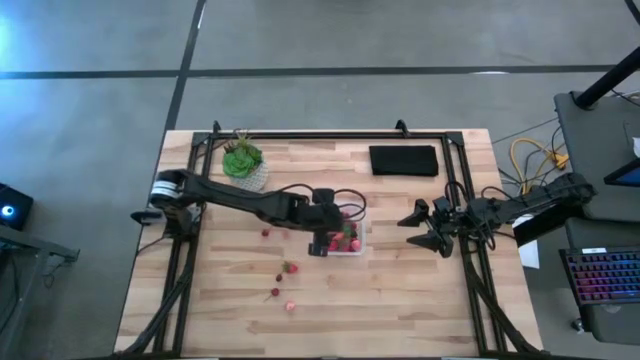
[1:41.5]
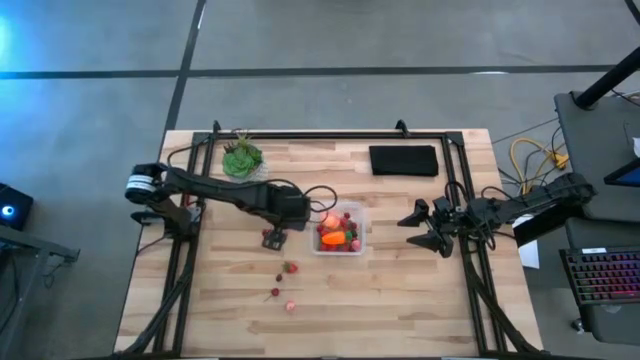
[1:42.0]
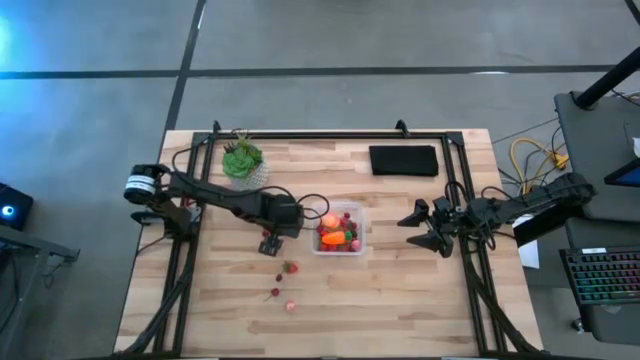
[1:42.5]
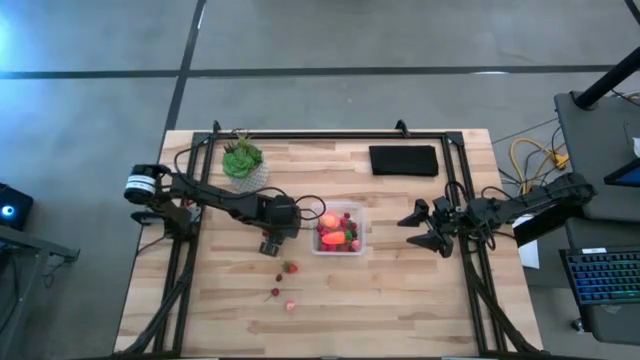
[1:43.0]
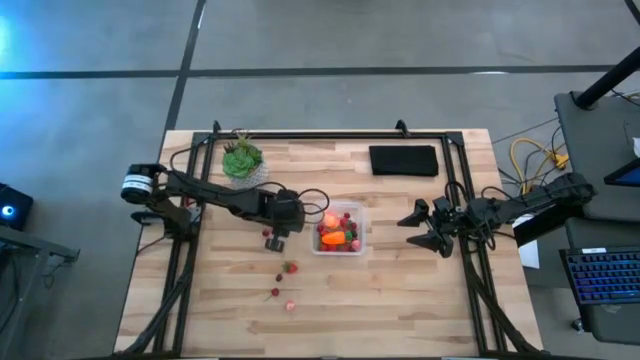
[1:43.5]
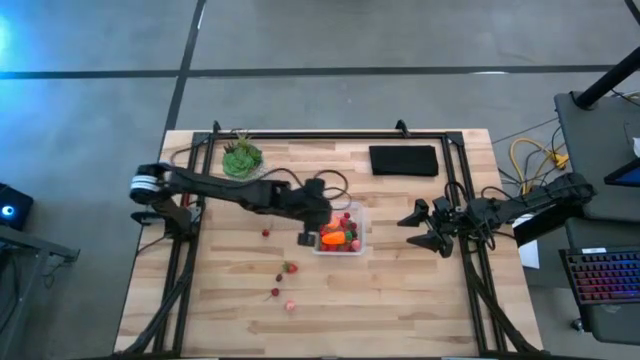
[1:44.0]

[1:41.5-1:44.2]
Task: Pick and placing Produce into tupperware
Put the top small peach into the transparent container

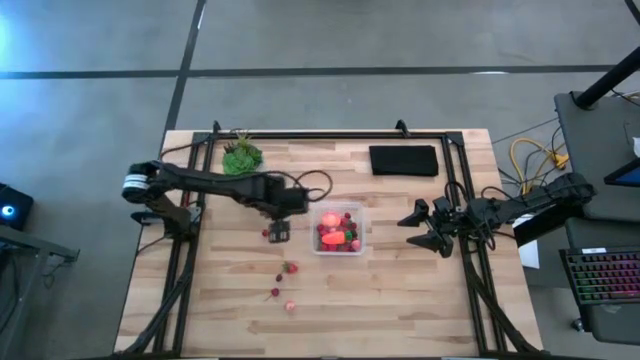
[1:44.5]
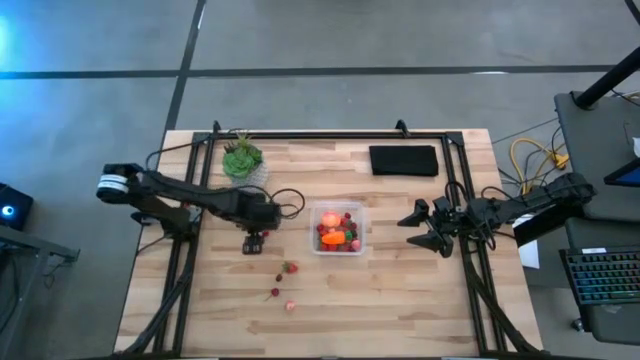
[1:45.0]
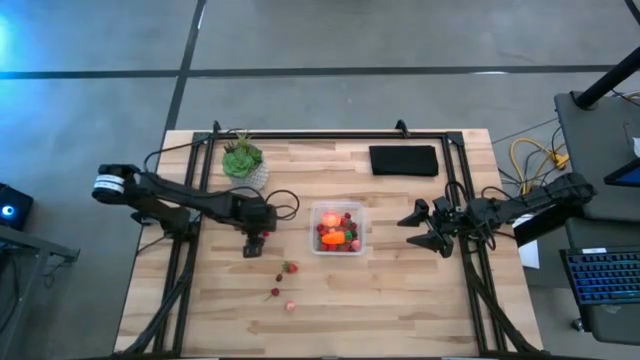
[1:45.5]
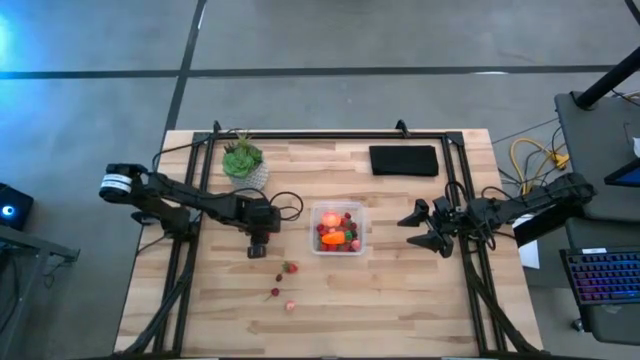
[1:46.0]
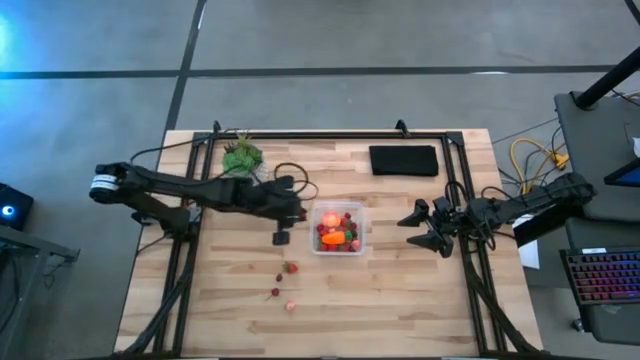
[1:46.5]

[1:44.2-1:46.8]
Put the red cherry into the transparent container

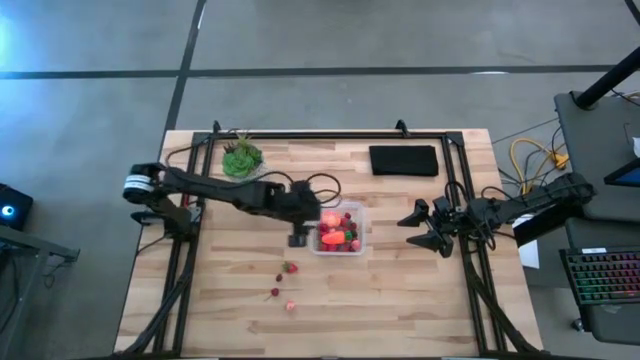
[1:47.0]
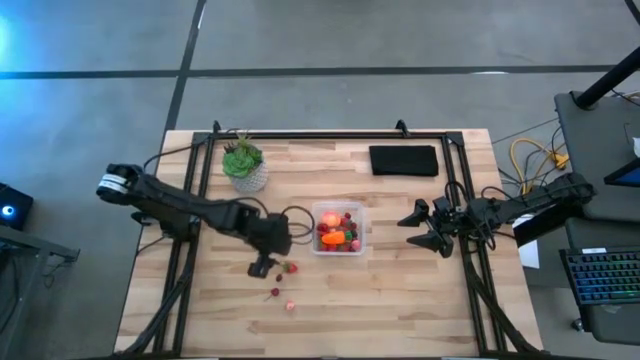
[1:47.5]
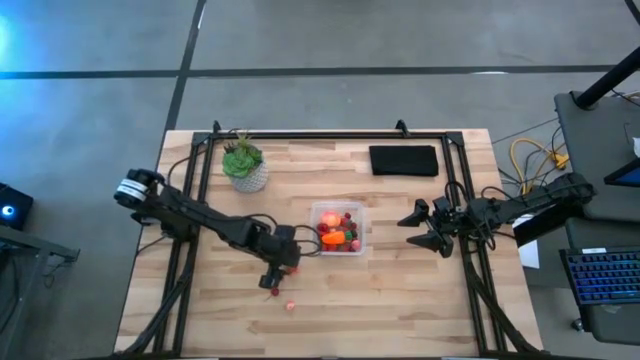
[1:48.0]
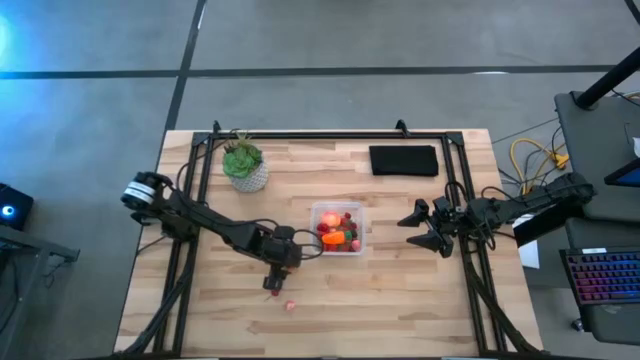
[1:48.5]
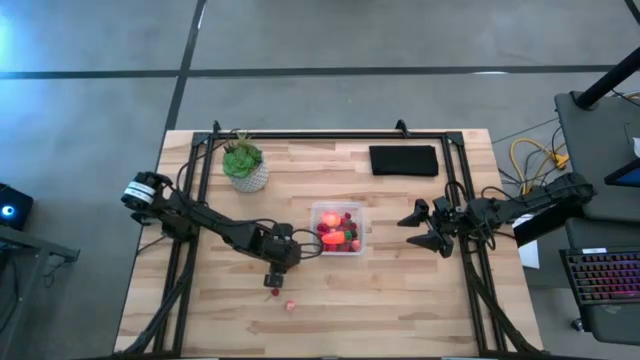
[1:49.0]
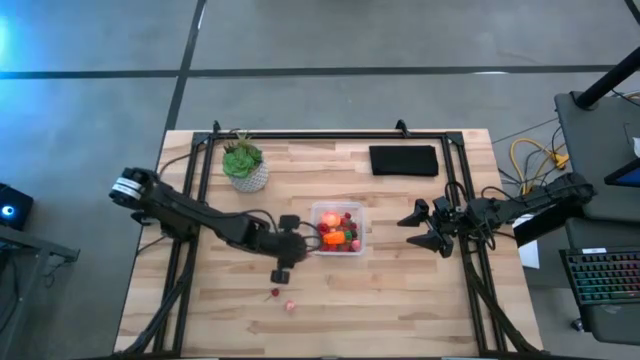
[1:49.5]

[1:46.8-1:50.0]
Put the strawberry into the transparent container

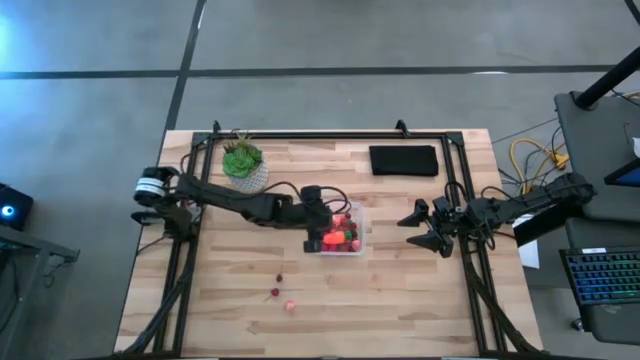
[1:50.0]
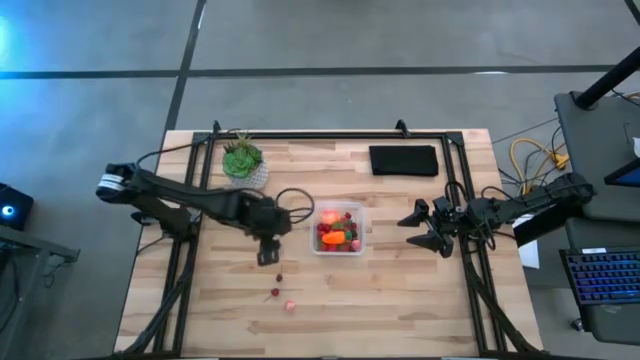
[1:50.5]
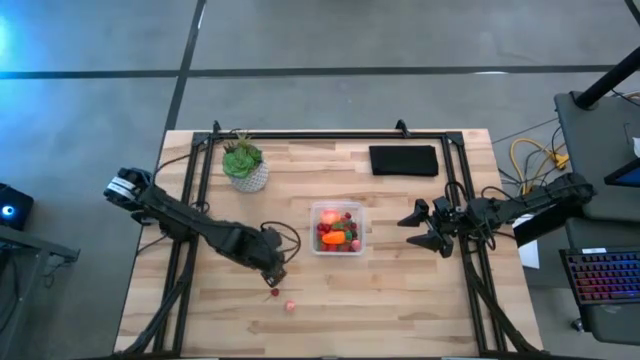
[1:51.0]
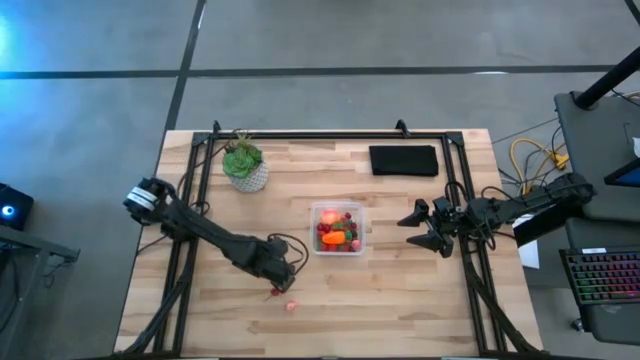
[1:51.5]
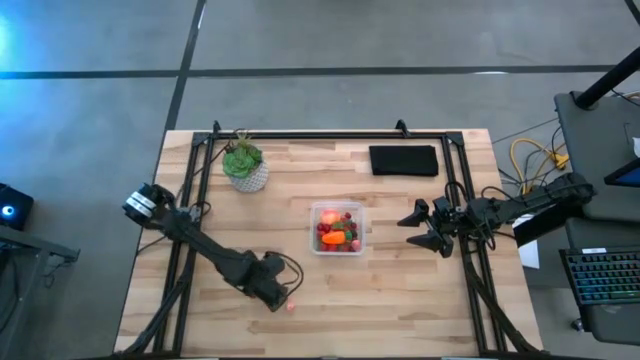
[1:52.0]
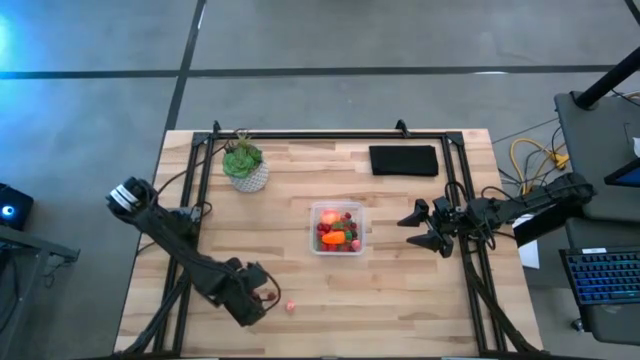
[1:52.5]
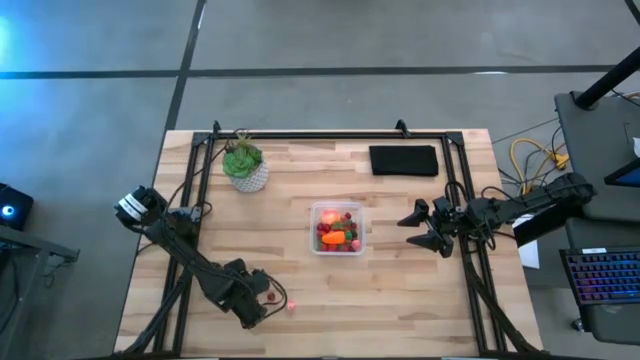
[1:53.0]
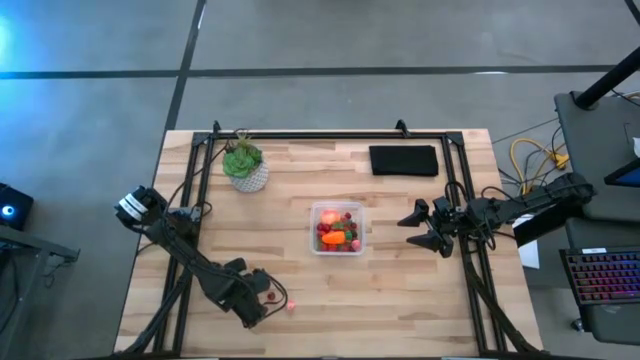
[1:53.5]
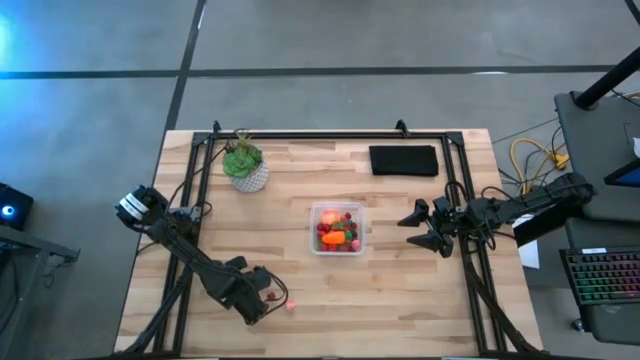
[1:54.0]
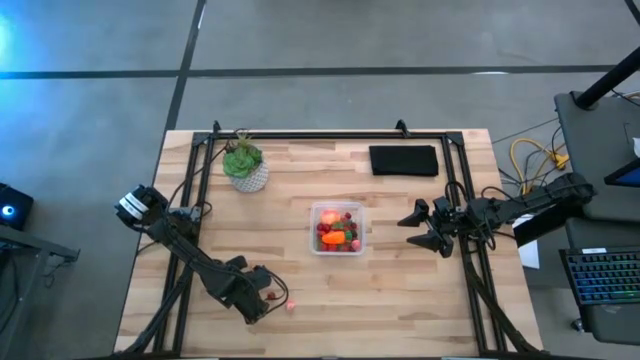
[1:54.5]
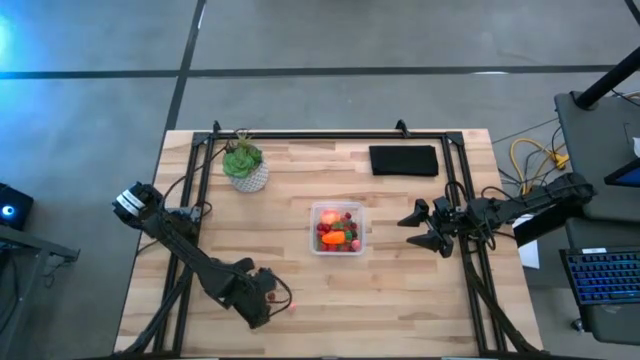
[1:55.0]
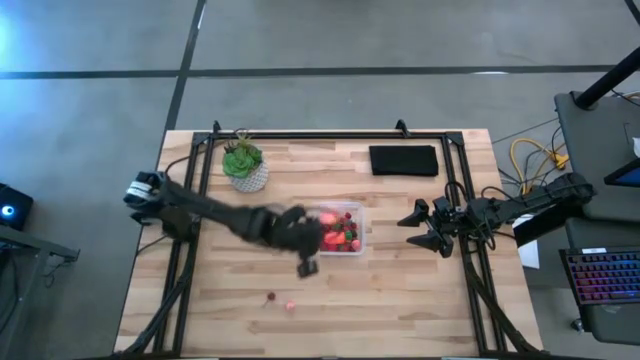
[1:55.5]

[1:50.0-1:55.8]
Put the red cherry into the transparent container

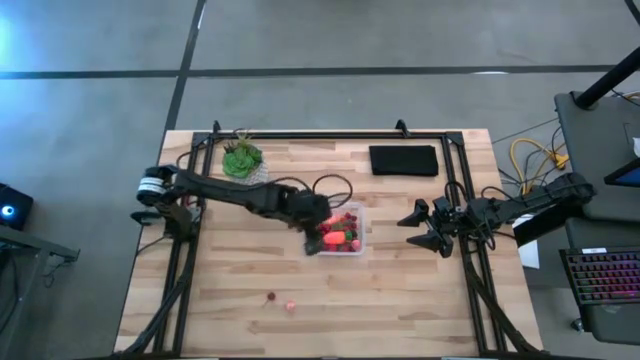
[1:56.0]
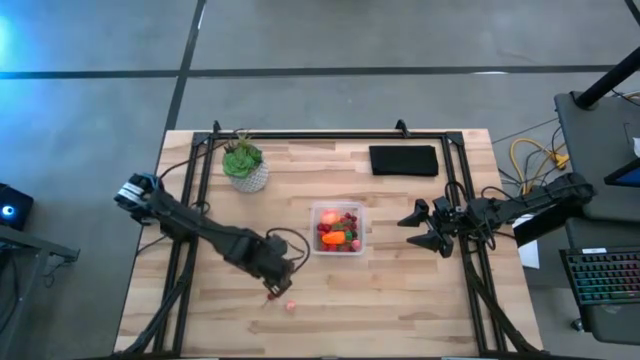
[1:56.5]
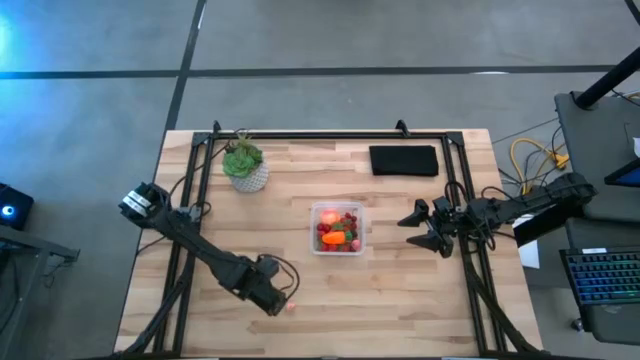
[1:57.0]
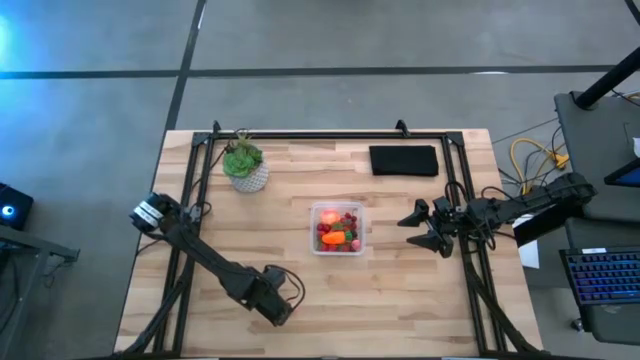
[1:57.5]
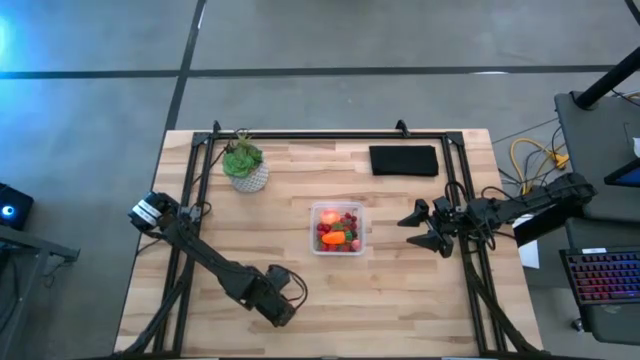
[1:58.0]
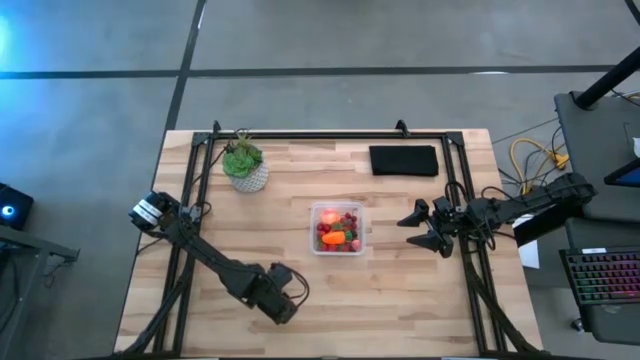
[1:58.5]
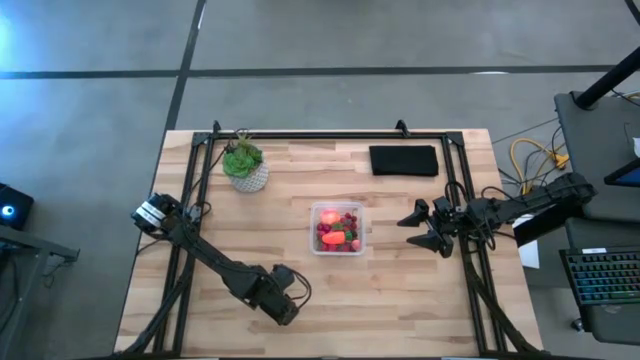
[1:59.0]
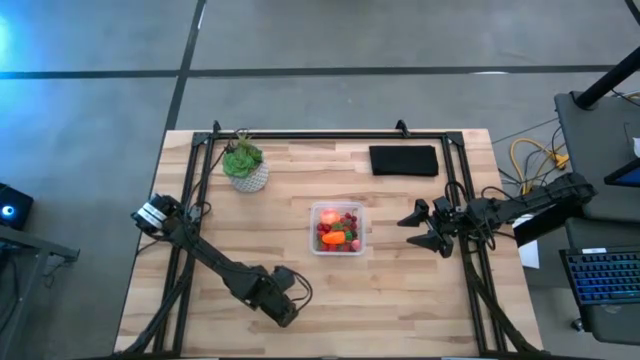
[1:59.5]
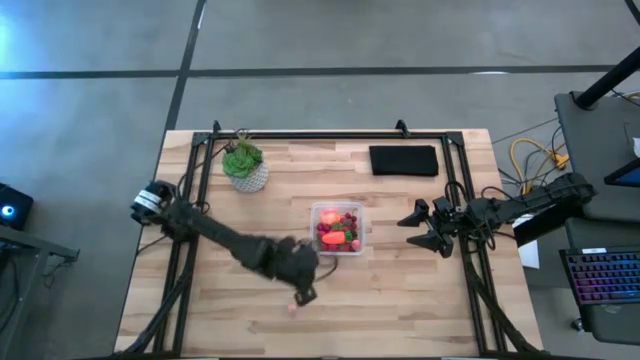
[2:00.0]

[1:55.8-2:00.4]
Put the red cherry into the transparent container

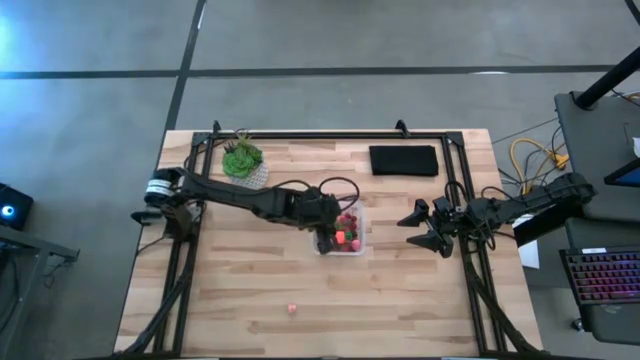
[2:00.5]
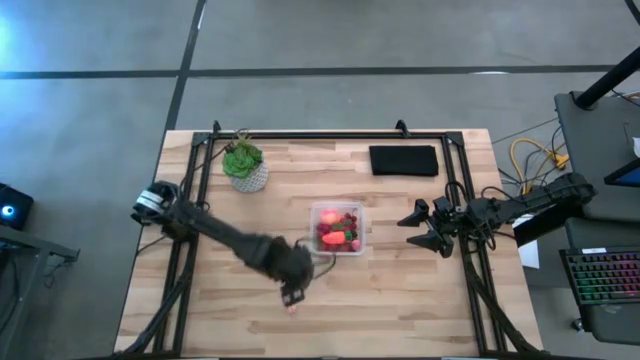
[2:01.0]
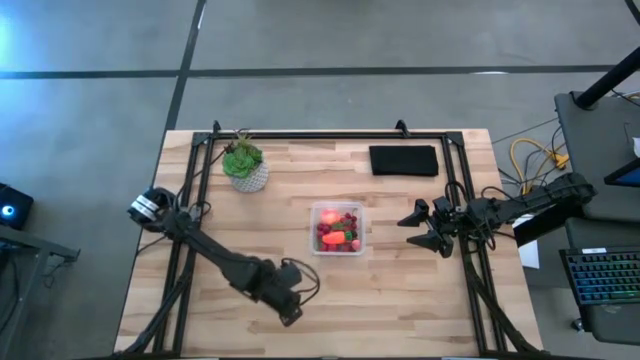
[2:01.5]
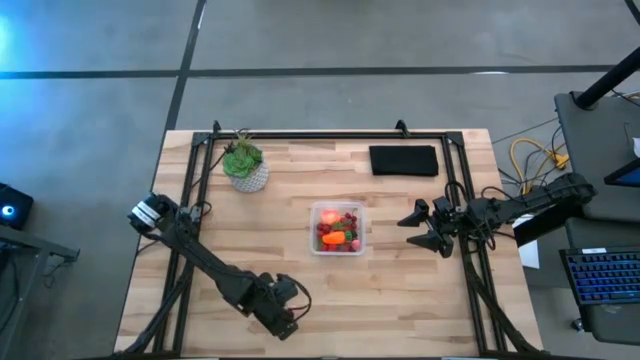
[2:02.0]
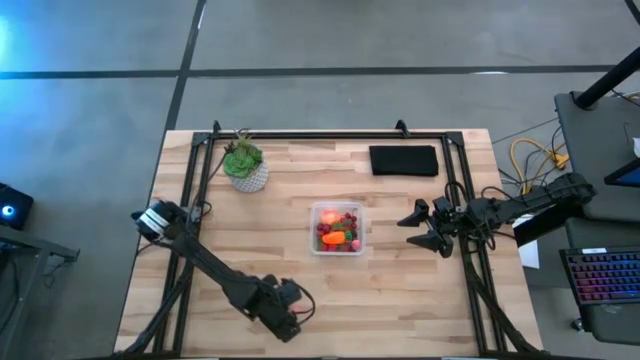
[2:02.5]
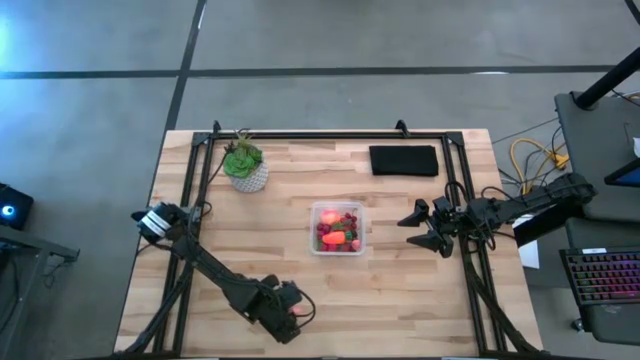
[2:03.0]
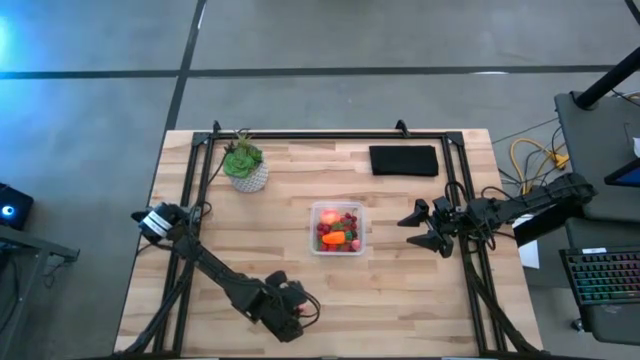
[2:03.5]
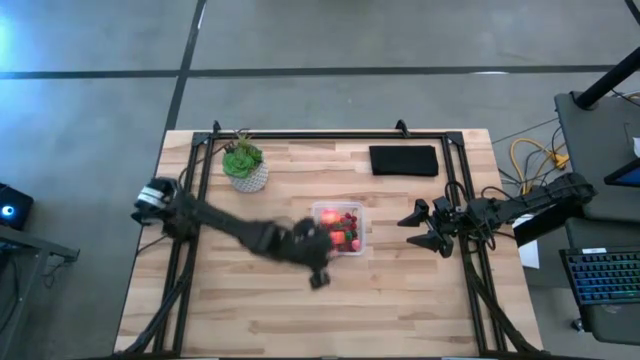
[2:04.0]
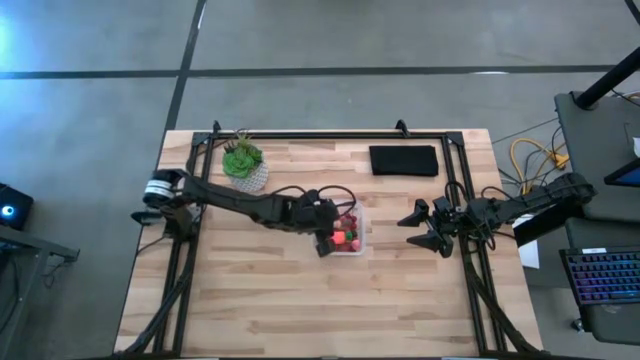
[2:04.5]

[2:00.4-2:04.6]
Put the small peach into the transparent container
